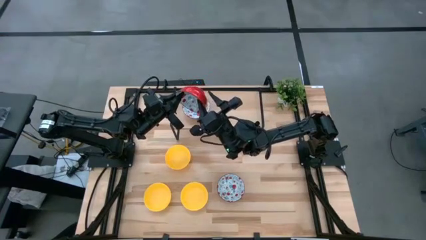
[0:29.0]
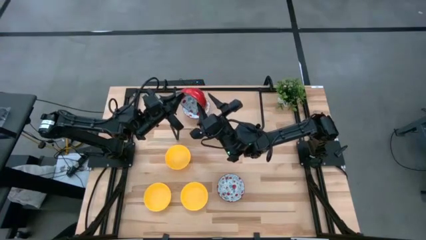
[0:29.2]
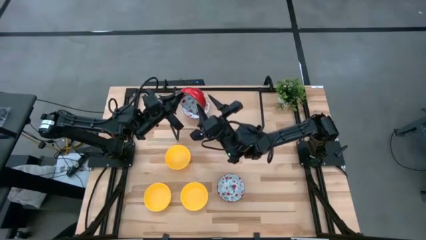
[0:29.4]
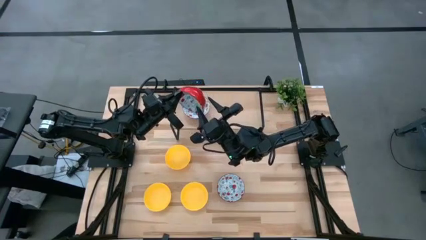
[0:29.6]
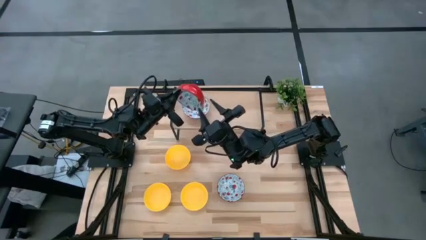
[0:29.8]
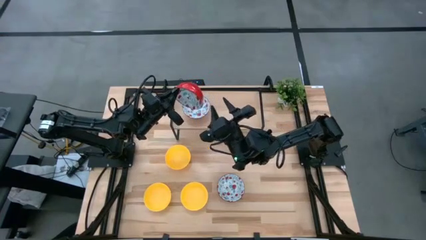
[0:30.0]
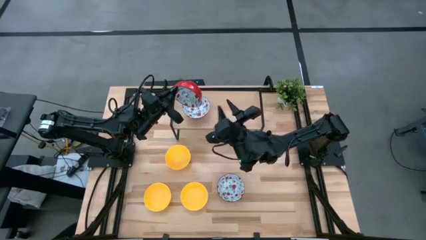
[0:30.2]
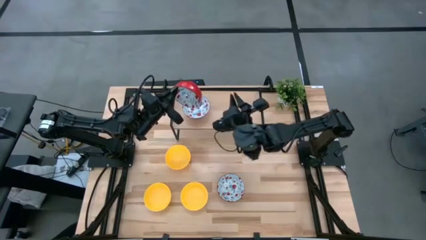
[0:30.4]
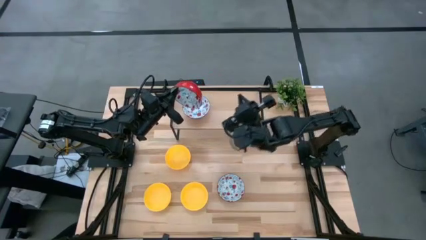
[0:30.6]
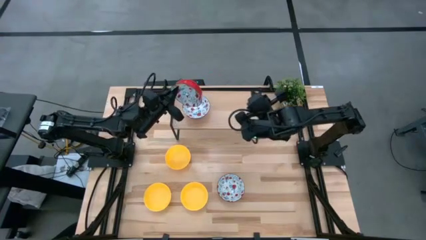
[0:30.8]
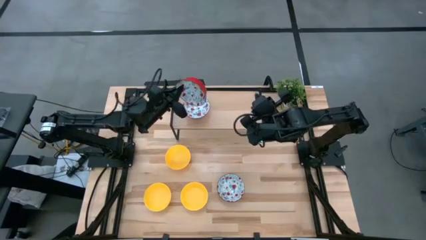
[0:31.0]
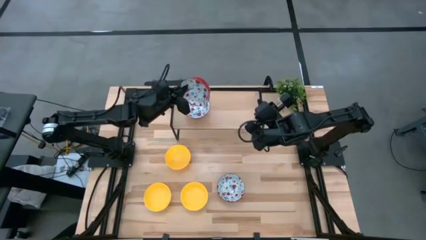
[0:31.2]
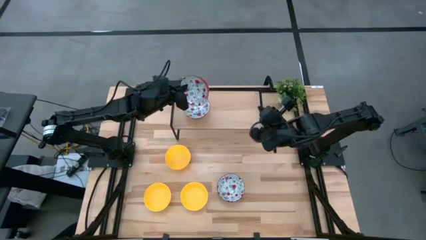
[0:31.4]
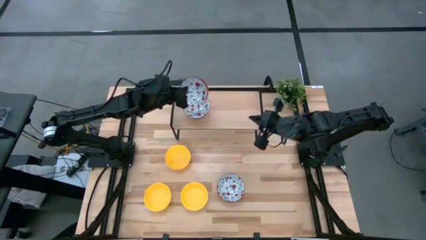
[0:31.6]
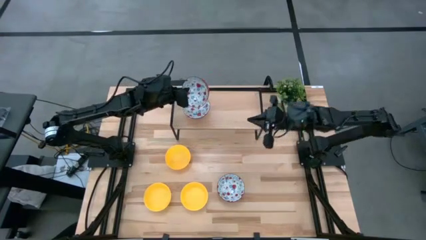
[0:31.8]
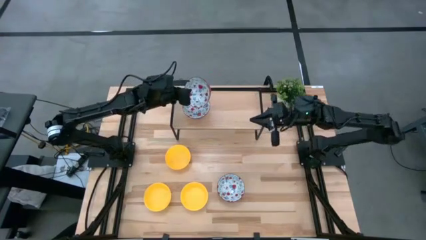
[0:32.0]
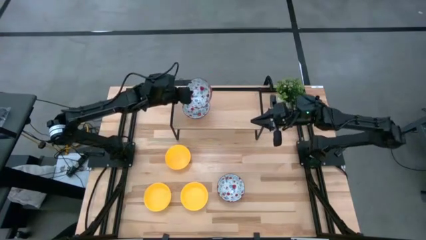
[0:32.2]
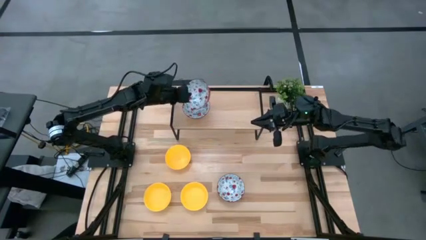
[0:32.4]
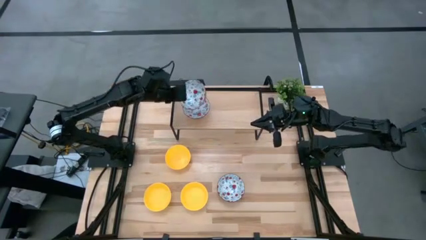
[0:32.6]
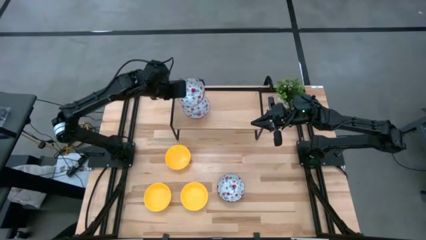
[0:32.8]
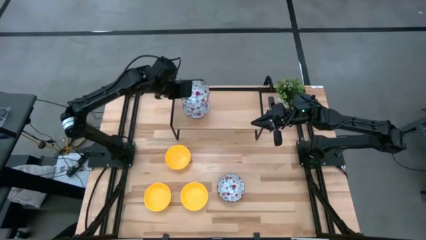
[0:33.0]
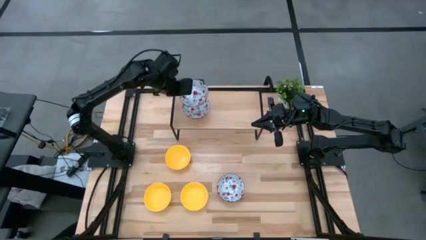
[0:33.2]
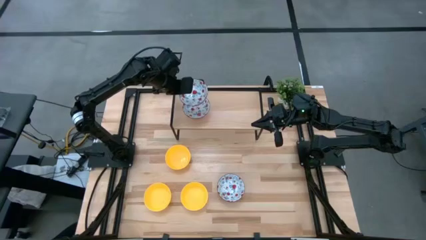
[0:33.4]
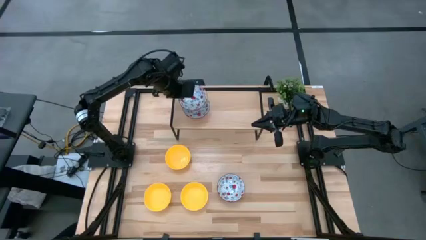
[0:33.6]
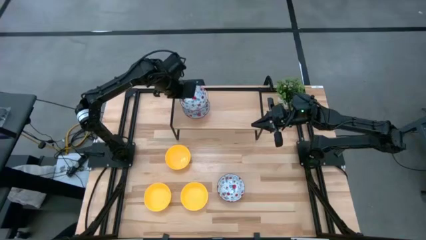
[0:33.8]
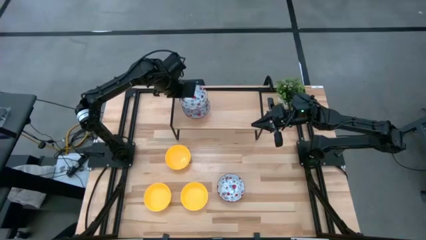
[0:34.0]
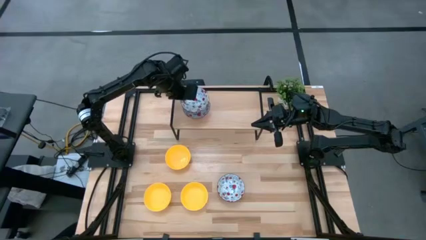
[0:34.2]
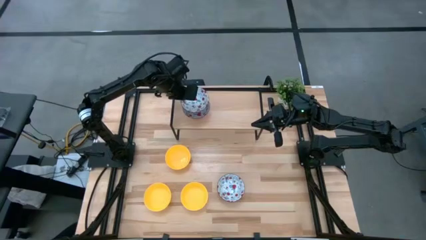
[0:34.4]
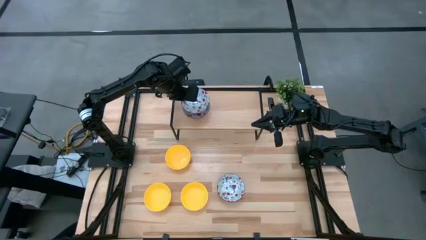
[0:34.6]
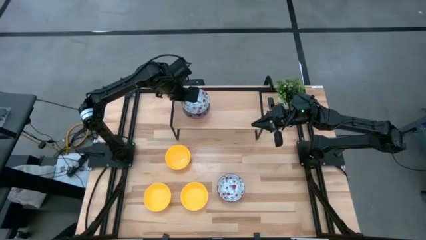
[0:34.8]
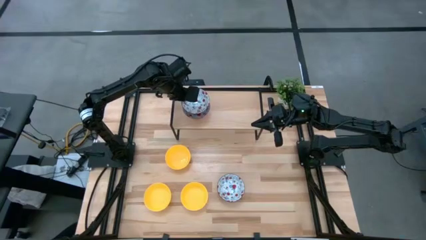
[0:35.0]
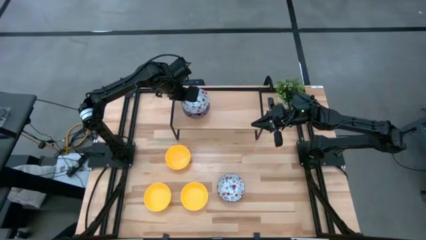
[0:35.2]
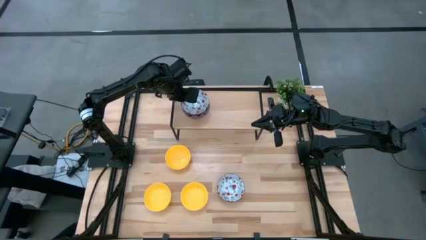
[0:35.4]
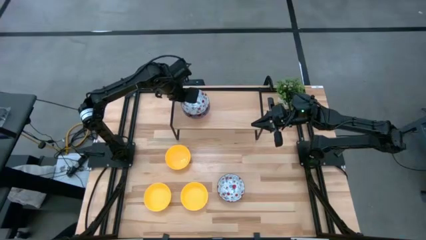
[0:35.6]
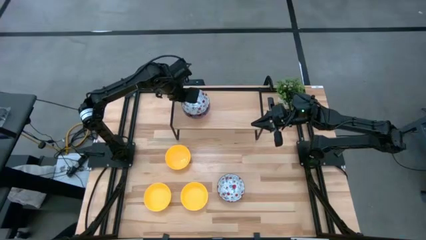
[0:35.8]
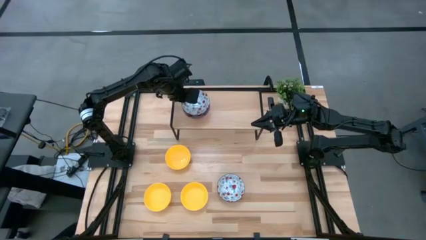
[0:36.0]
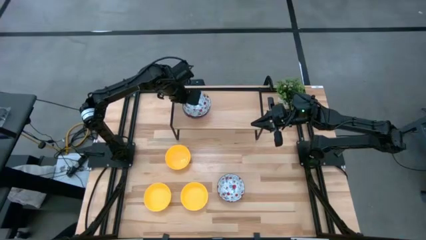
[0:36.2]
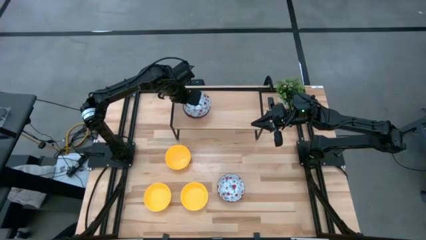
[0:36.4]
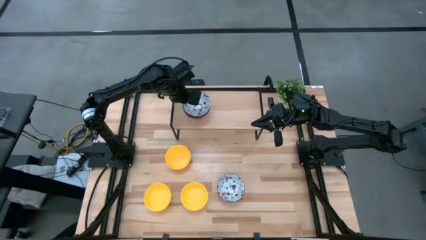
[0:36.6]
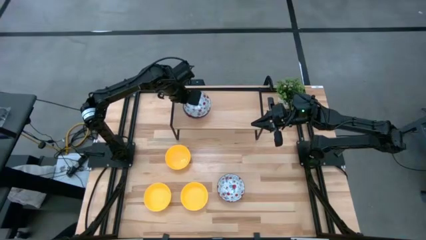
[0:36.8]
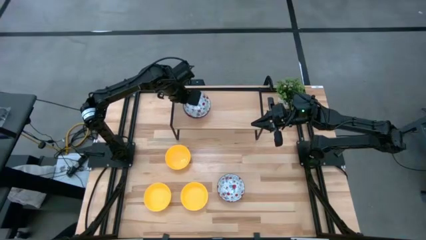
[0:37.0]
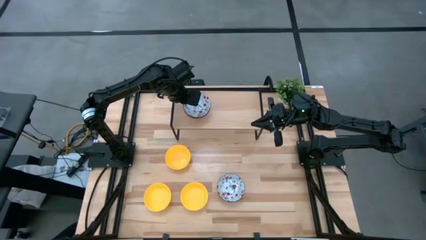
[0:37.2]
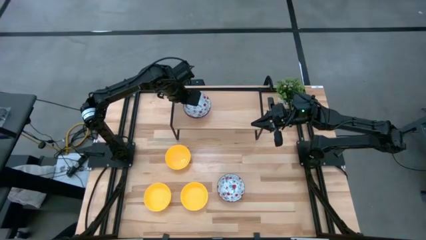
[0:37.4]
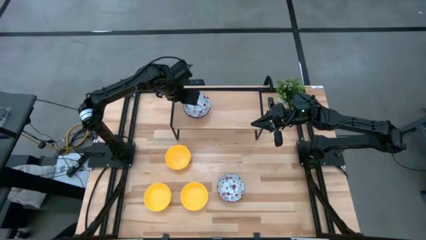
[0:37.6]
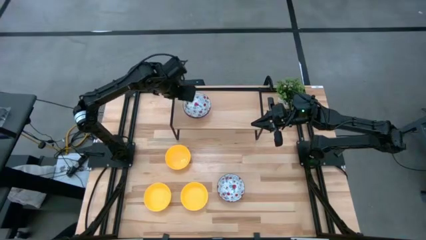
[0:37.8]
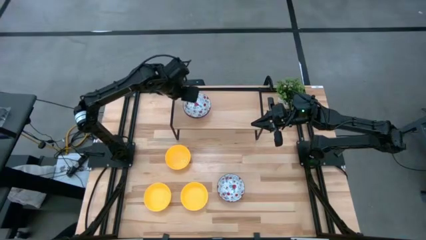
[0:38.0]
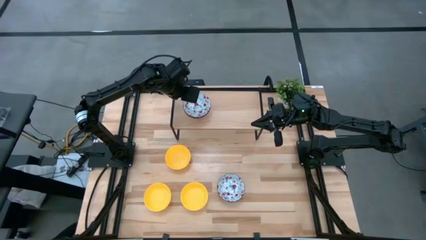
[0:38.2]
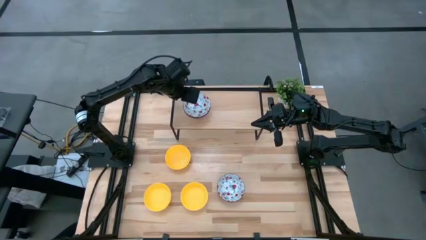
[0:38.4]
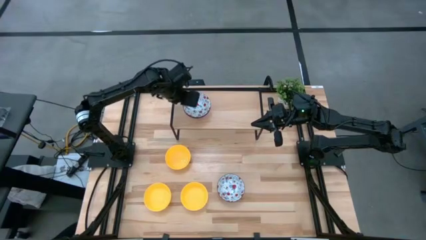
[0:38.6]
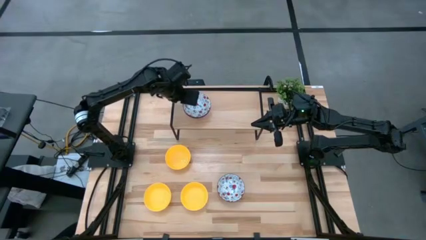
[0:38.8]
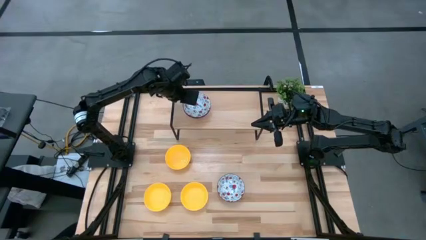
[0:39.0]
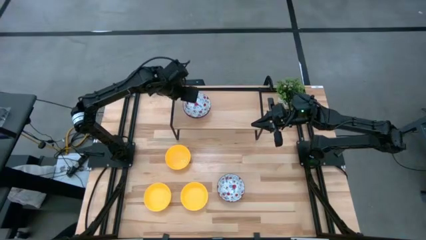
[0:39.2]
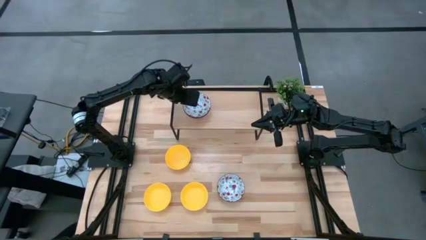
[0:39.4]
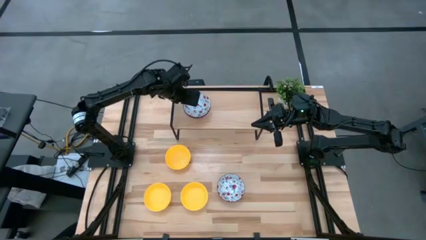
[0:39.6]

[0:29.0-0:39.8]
Task: Pick & Place Mini bowls
Stack the top red bowl on the red bowl on the shelf
